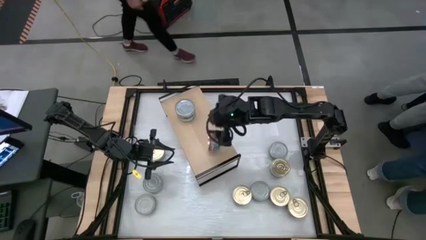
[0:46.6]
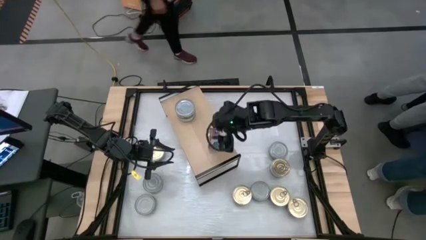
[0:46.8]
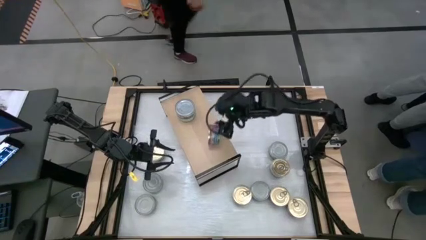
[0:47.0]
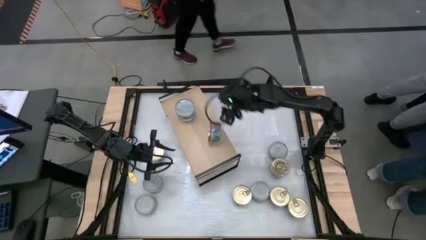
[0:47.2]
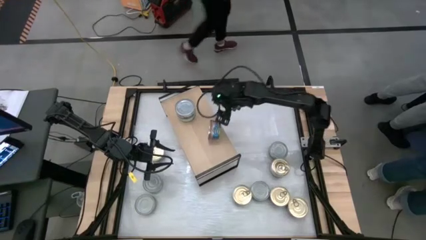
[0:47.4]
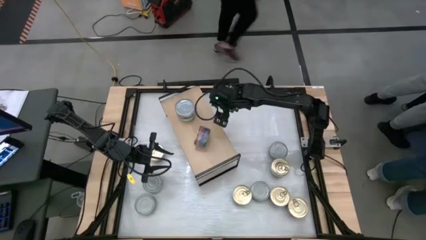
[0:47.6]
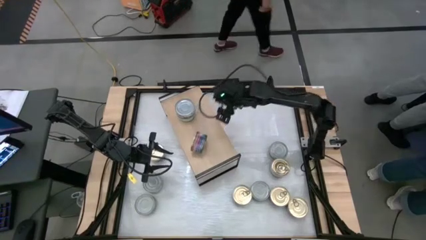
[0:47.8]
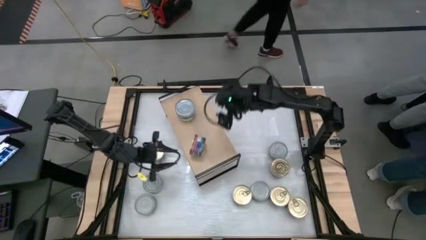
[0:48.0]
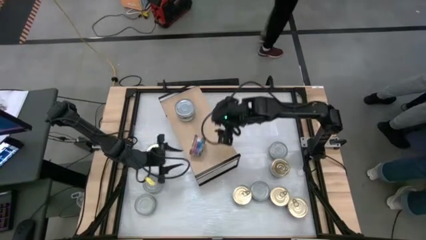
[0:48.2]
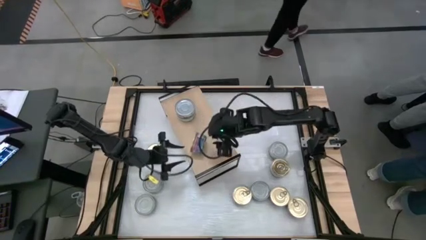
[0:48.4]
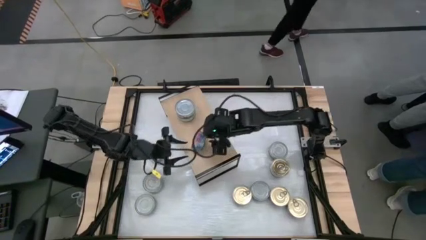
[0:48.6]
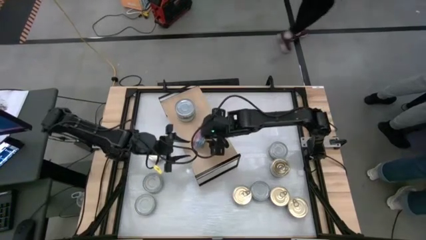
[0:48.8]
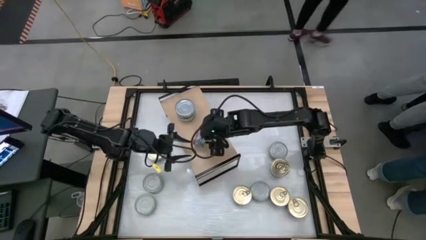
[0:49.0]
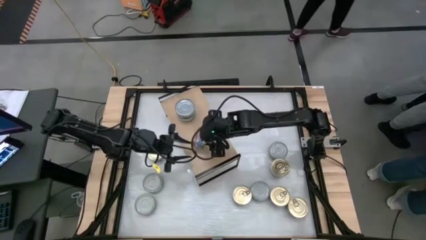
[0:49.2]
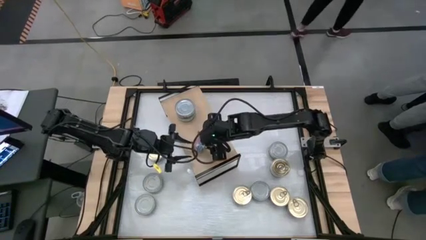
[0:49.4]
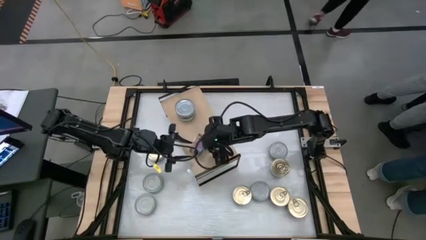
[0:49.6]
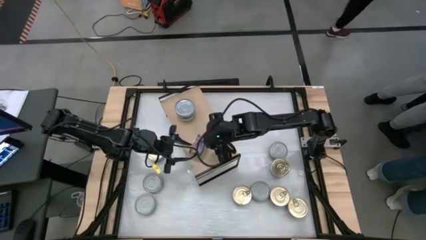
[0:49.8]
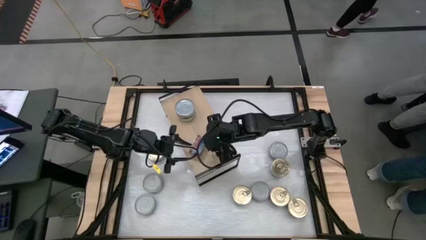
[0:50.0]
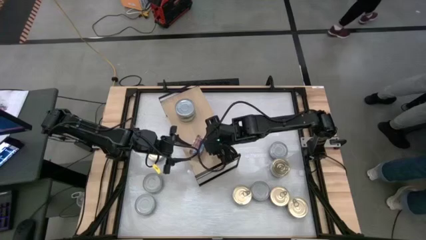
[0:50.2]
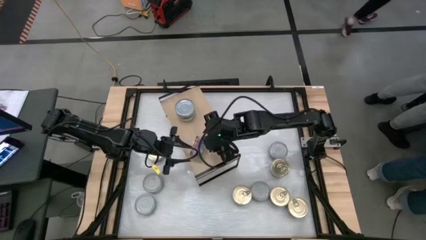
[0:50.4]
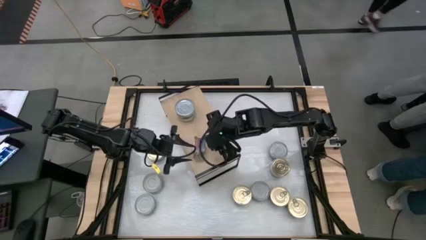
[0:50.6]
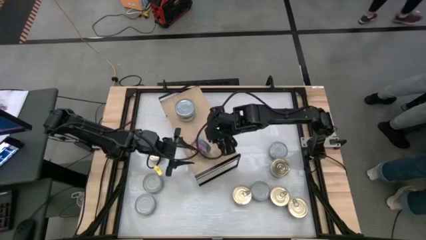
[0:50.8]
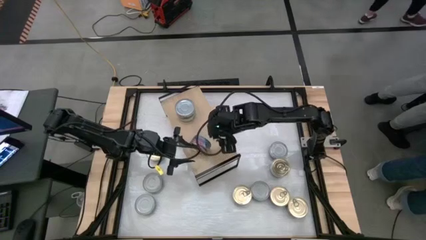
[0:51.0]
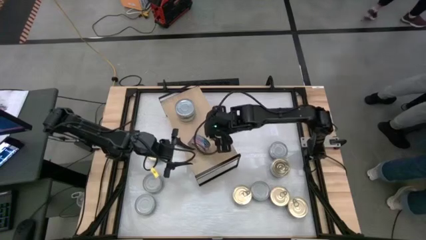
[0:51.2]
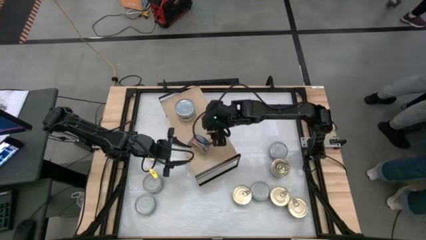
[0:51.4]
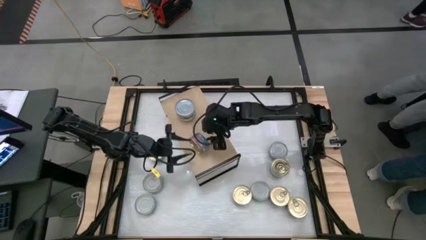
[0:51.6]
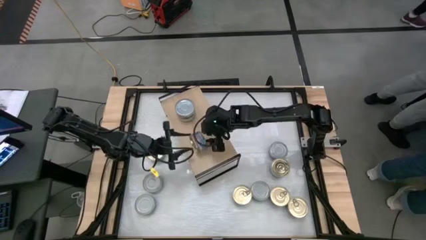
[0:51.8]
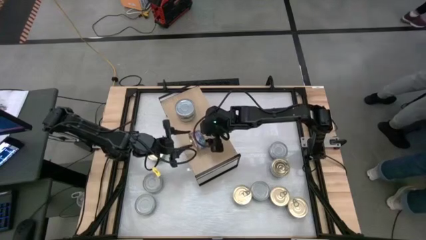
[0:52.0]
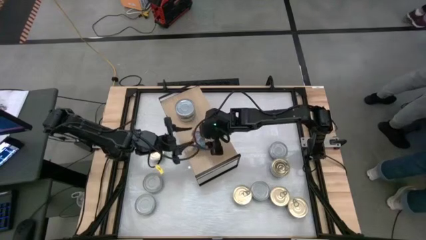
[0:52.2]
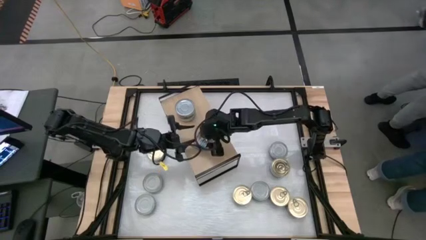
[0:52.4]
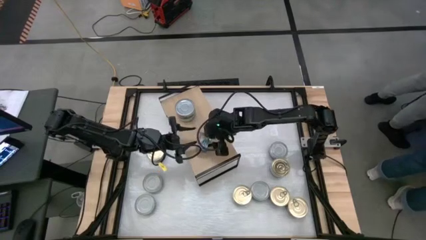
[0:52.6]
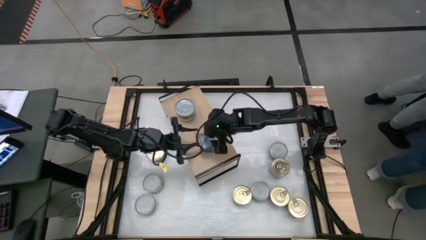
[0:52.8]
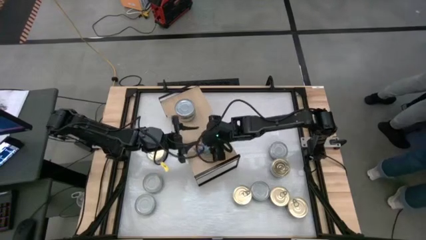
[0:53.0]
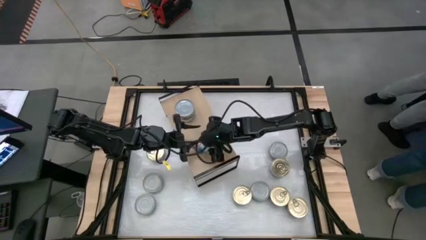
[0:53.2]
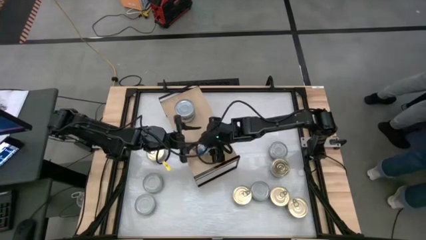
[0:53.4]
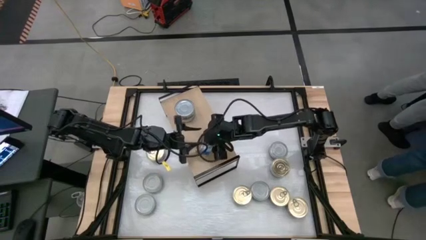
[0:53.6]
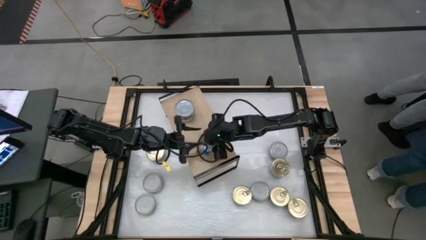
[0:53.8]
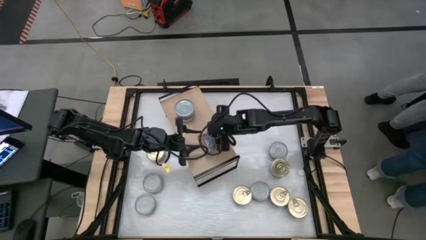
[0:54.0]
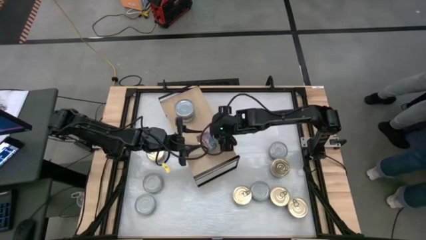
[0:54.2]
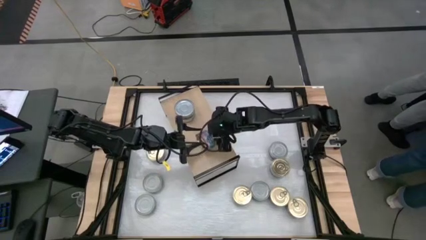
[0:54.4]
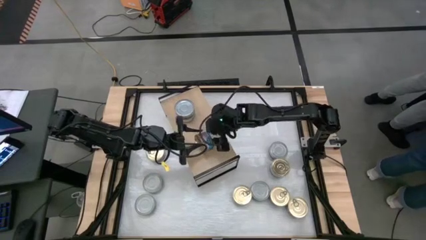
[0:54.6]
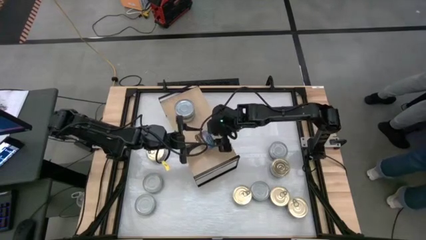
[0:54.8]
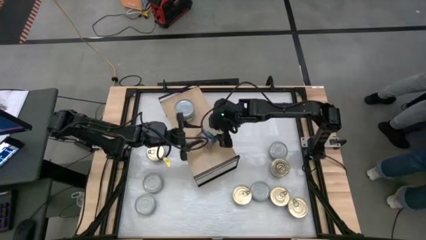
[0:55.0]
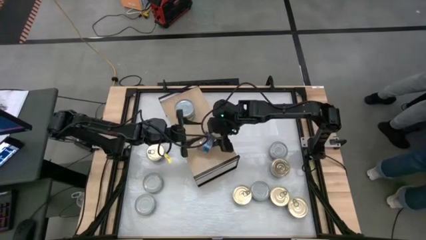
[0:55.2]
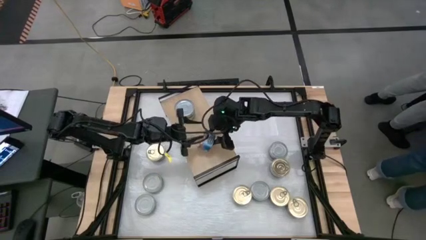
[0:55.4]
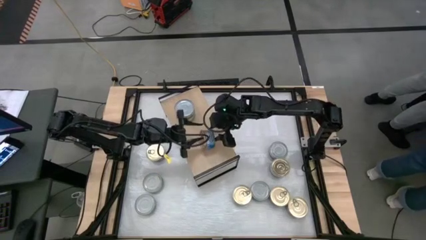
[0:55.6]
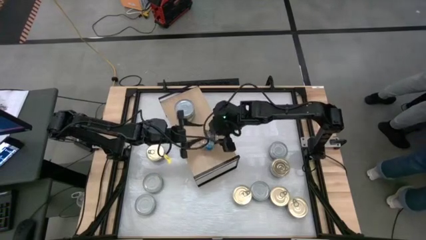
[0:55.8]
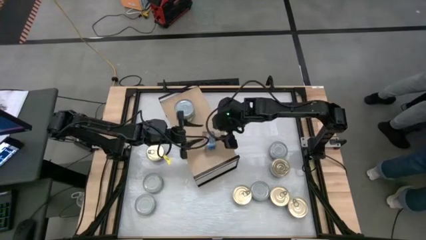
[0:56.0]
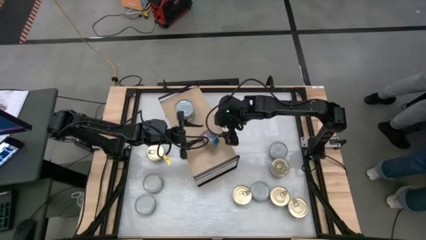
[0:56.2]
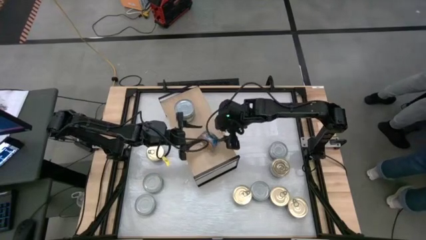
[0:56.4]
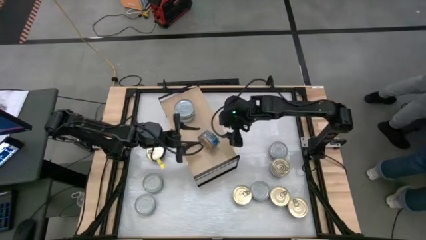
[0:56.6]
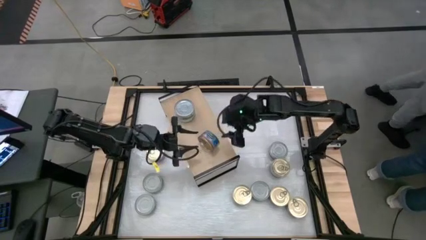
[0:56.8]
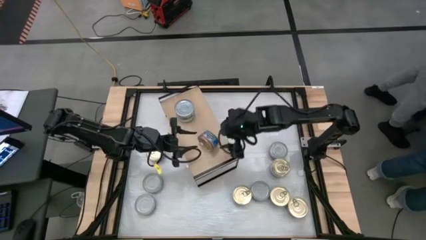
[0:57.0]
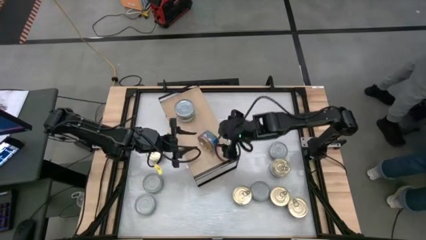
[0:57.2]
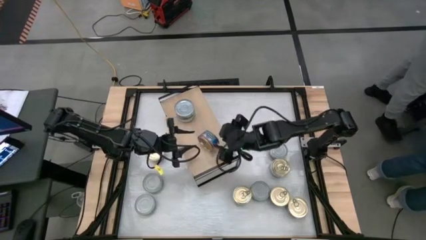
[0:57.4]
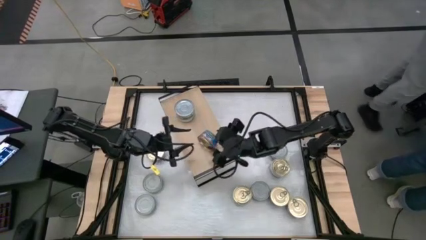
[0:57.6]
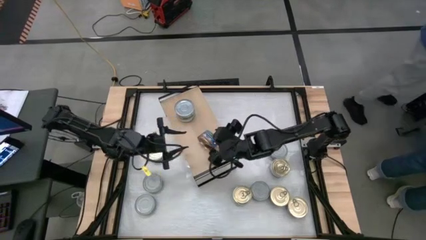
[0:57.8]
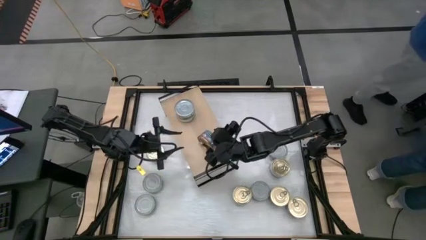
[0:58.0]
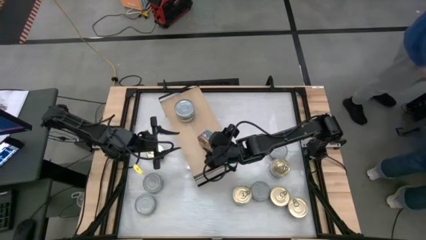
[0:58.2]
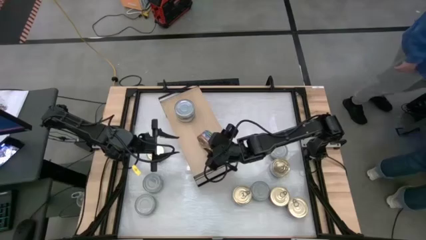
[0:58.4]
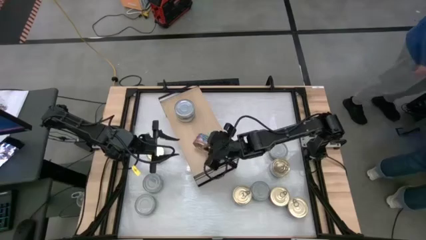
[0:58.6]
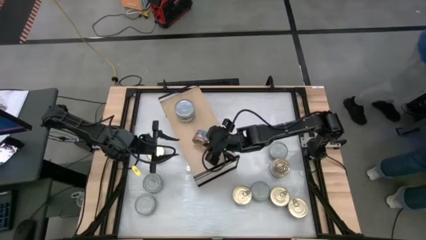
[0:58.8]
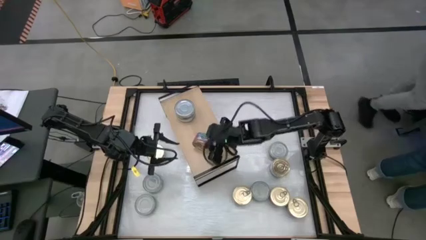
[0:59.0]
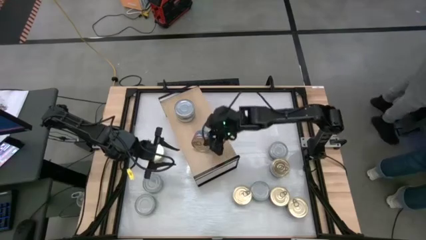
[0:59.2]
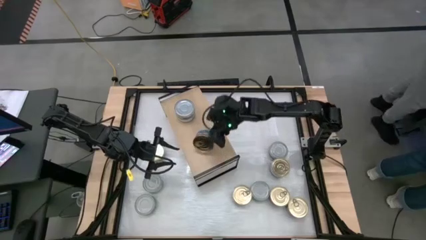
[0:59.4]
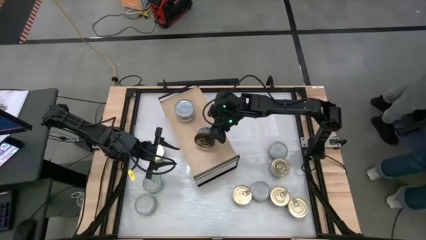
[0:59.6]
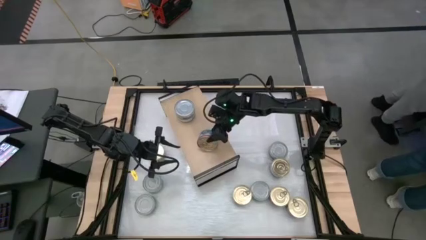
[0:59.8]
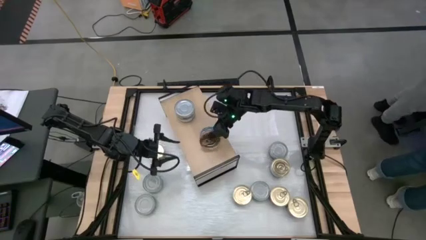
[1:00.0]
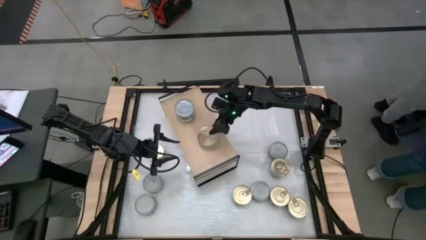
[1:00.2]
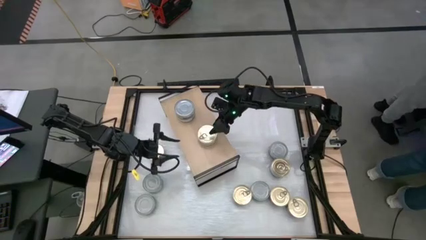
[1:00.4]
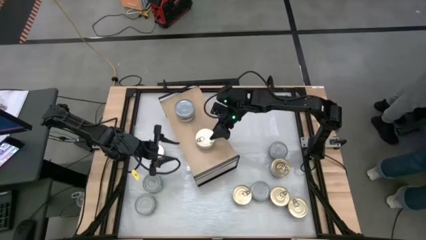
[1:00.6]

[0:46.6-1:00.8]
Task: Stack canned seafood by type on shelf
Put the blue tuna can on the shelf
